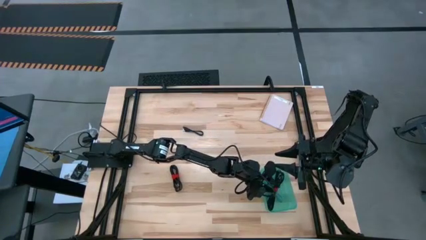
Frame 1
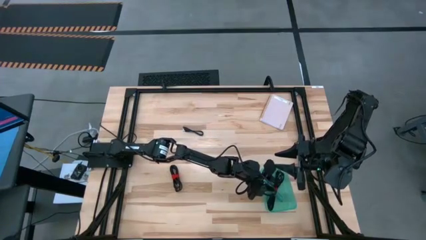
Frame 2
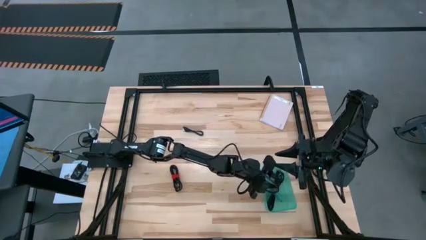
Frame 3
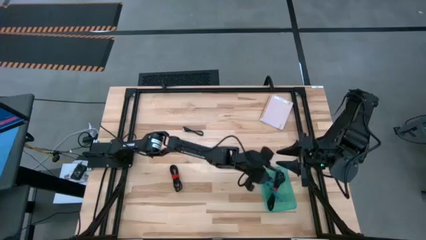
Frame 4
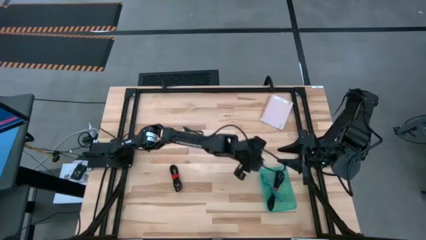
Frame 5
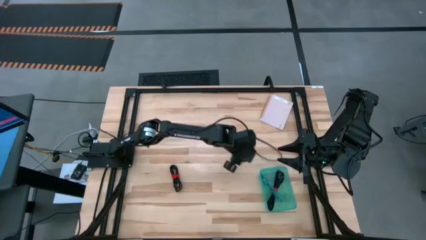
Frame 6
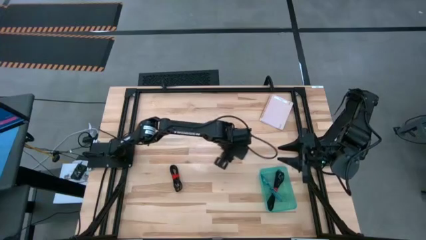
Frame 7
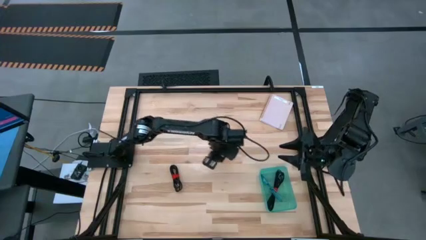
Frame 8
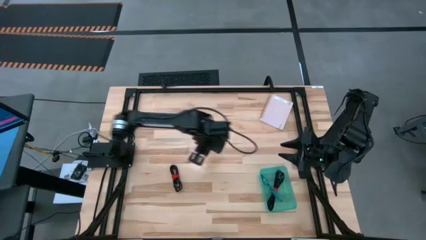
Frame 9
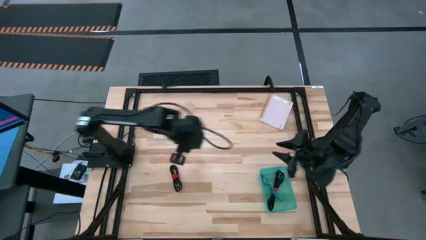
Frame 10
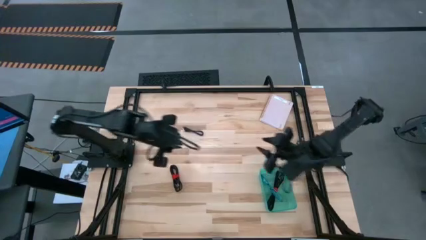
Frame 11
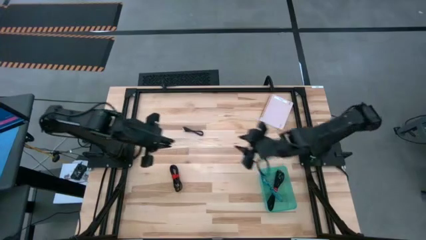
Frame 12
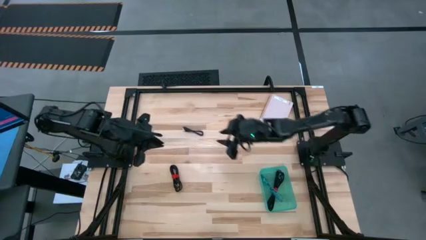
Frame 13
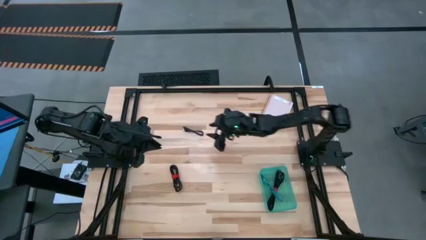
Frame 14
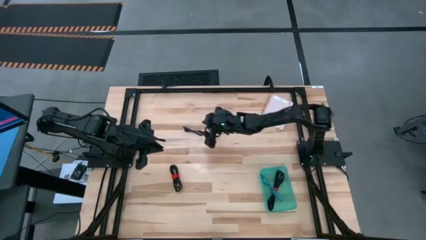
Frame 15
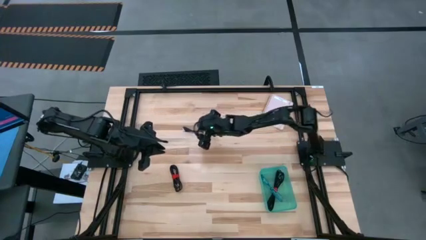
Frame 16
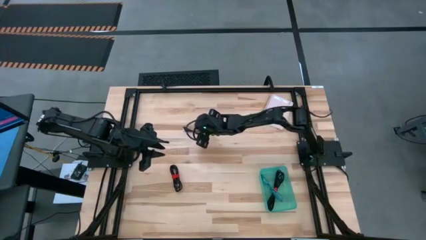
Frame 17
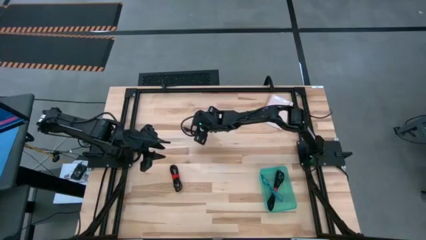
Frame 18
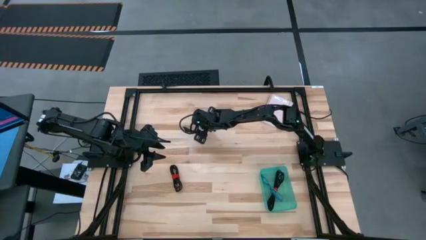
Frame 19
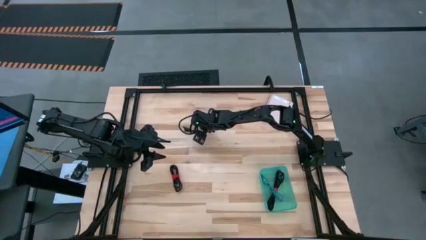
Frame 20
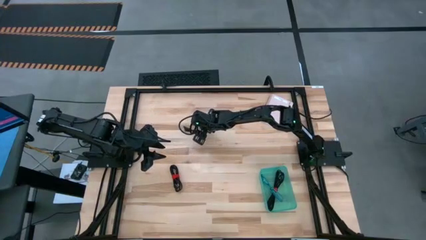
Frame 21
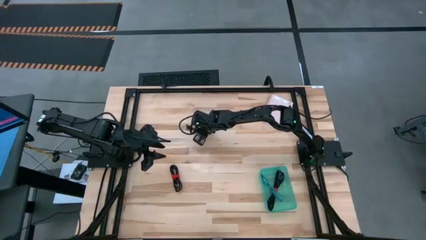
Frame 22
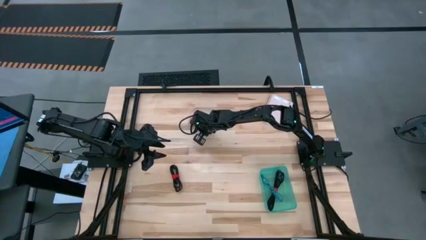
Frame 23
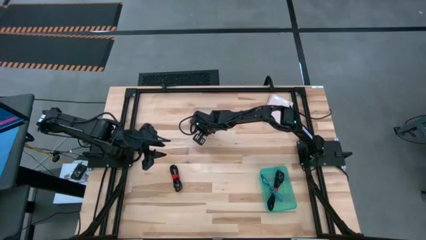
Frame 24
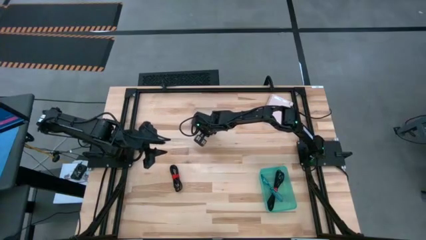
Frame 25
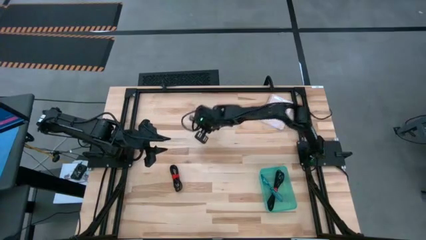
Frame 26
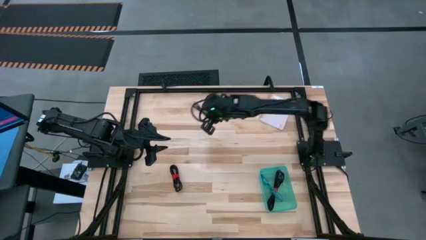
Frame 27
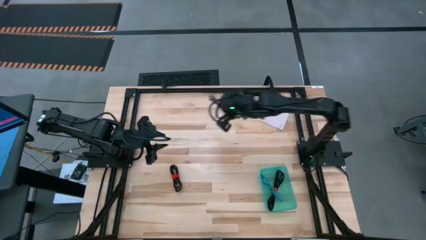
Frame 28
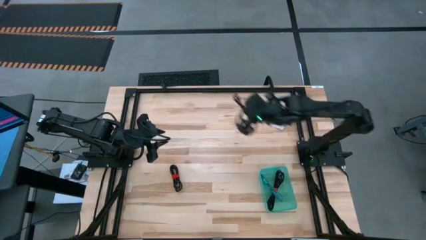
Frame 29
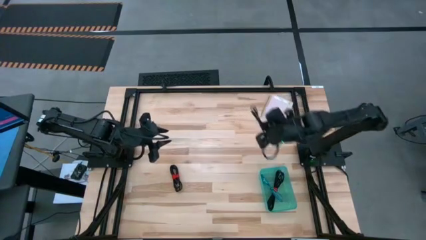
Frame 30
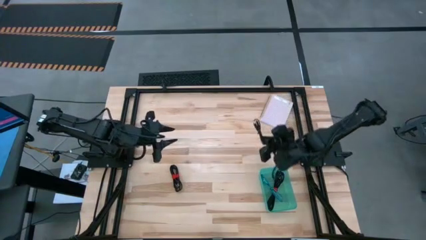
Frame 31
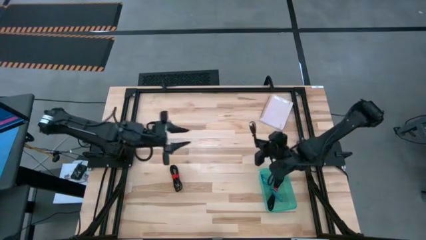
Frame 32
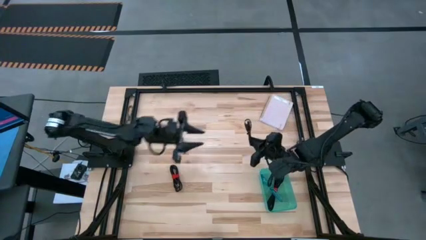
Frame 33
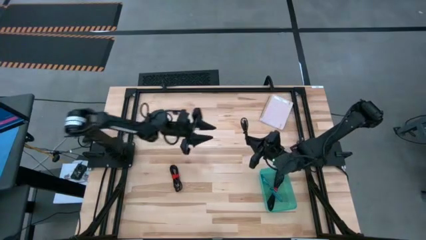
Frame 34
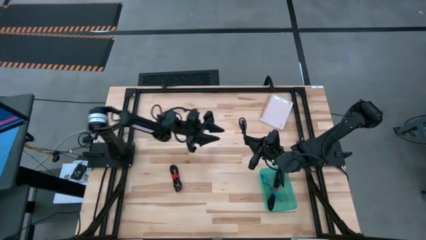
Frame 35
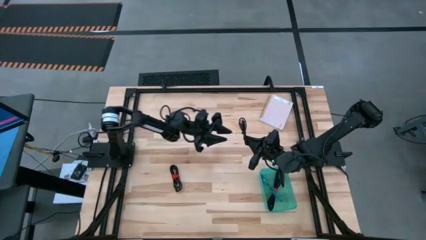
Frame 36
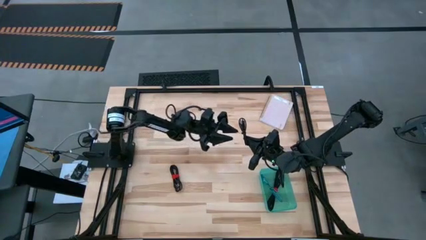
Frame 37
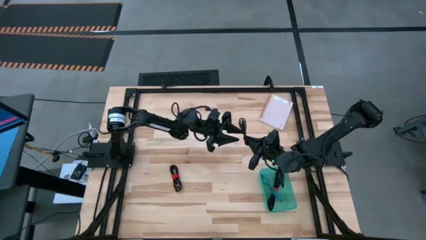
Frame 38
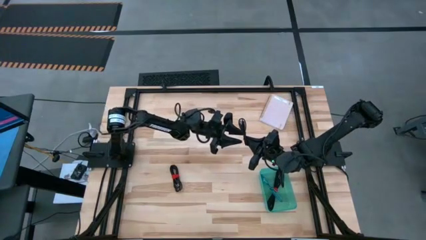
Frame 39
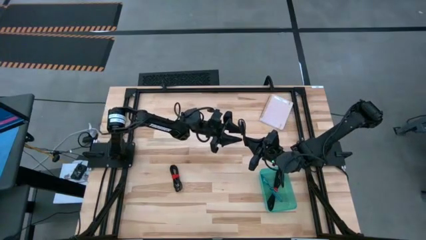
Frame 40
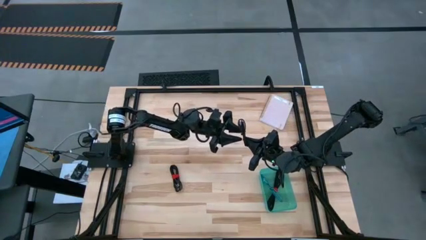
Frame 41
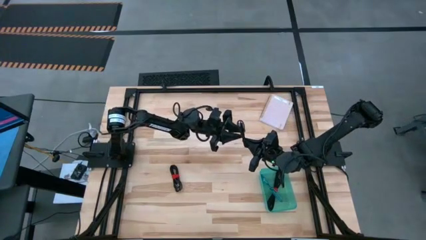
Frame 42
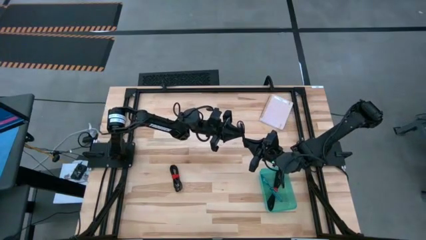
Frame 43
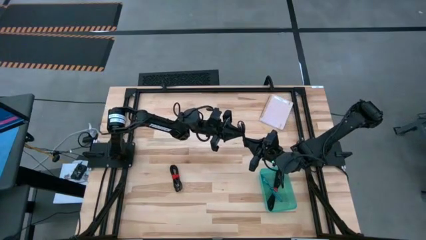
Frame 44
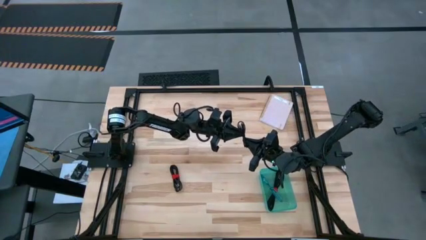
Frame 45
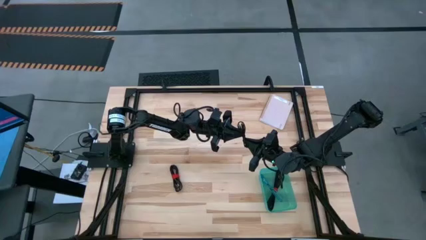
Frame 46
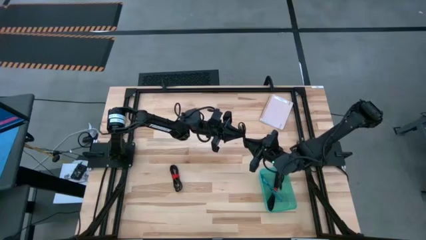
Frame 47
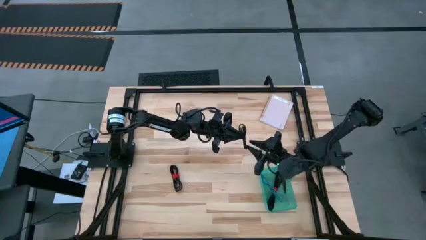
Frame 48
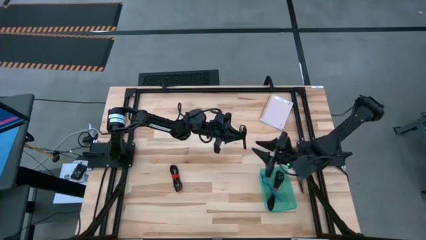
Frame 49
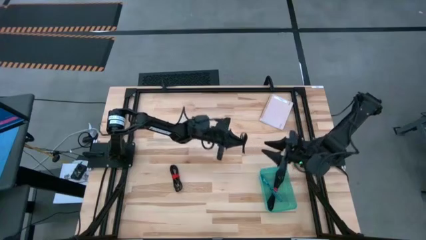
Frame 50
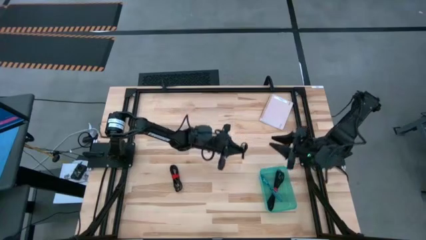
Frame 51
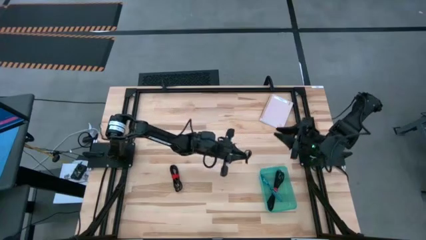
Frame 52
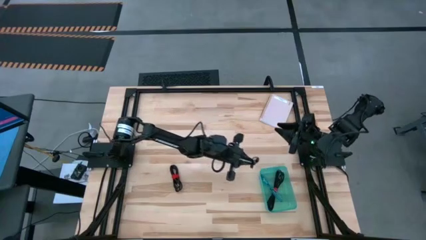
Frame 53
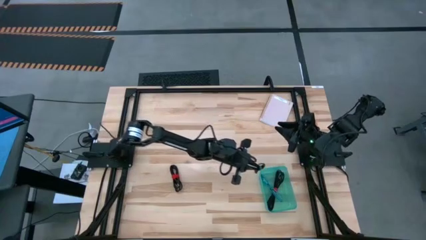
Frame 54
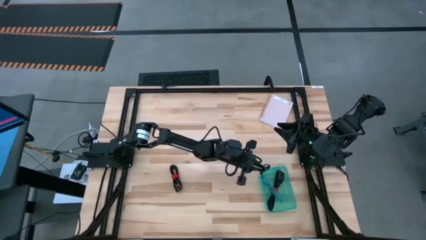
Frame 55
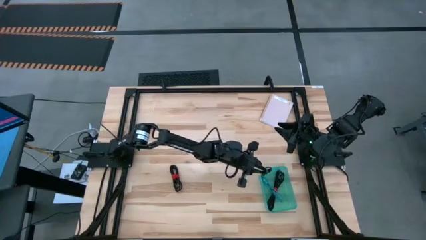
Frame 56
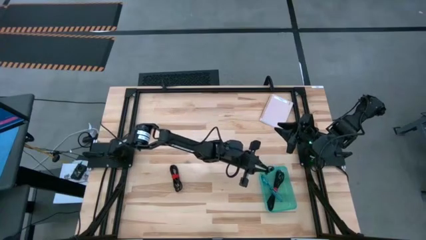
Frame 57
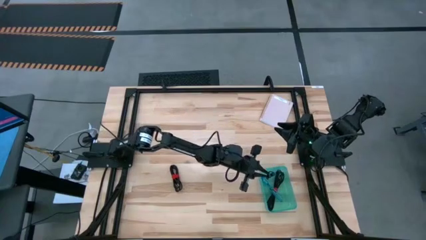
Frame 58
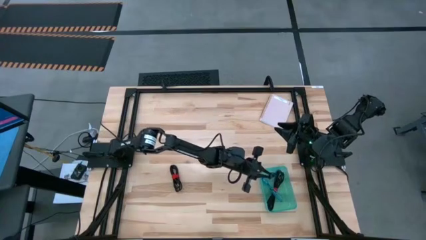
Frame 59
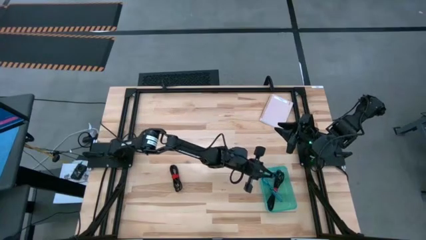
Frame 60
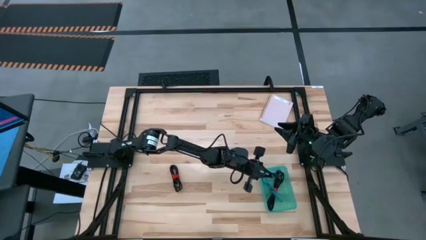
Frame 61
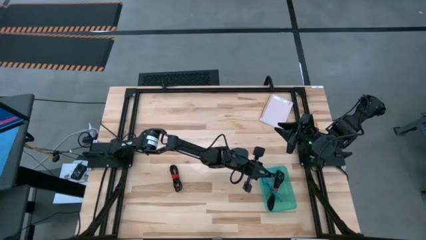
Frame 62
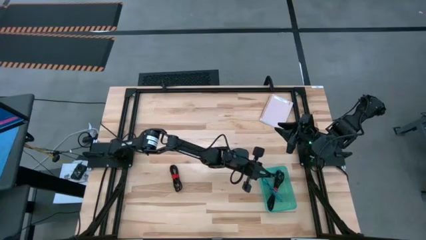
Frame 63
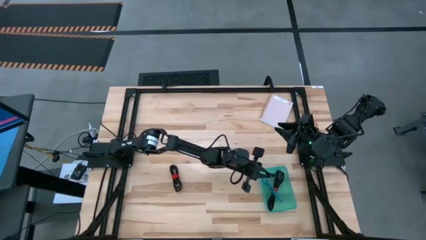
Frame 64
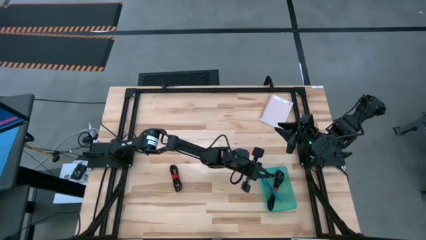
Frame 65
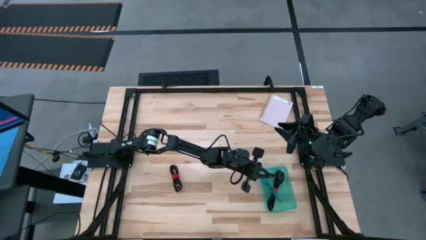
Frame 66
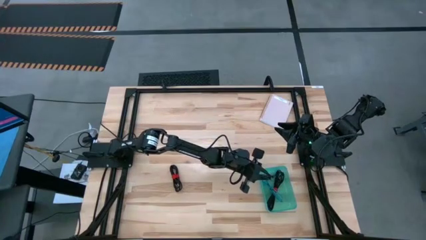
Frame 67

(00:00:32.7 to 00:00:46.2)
Task: Pick and place USB-C Cables
Put the top black charger cable into the green bin

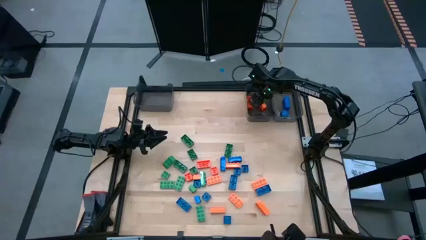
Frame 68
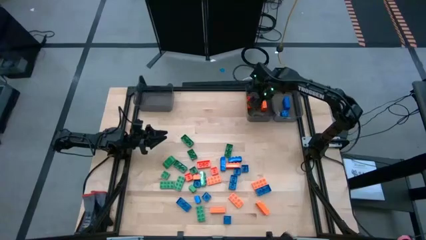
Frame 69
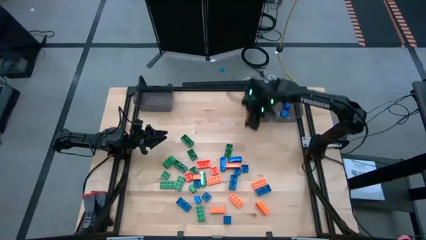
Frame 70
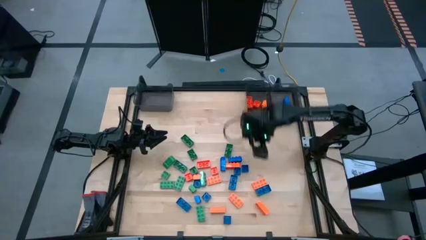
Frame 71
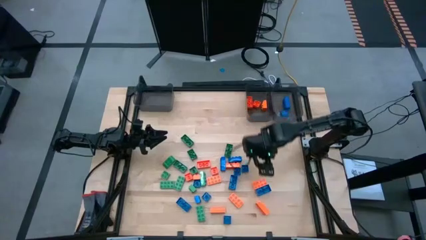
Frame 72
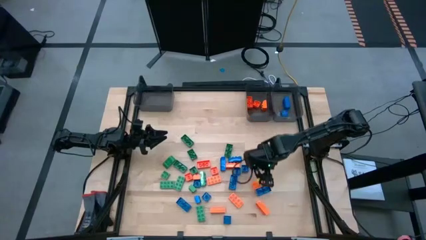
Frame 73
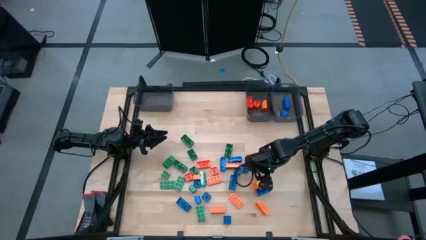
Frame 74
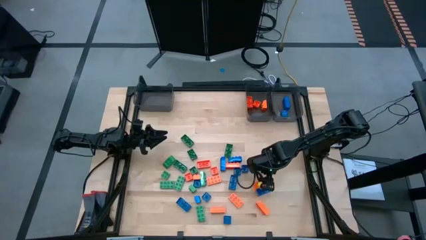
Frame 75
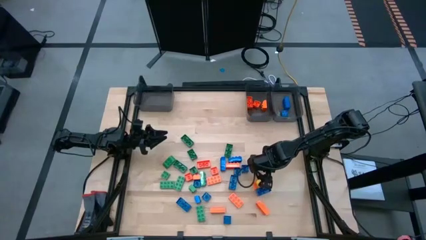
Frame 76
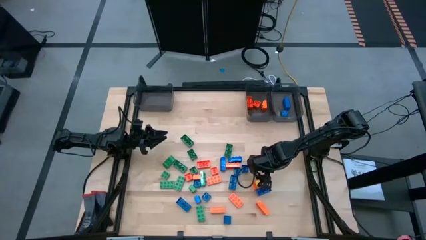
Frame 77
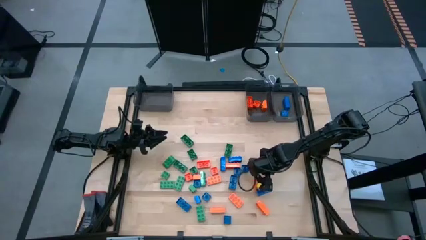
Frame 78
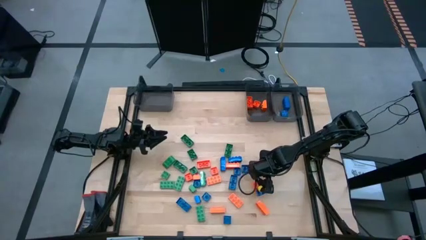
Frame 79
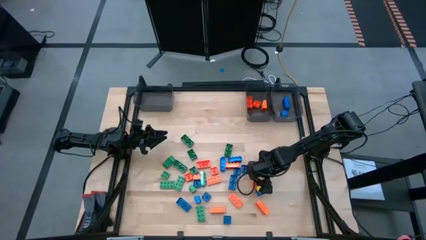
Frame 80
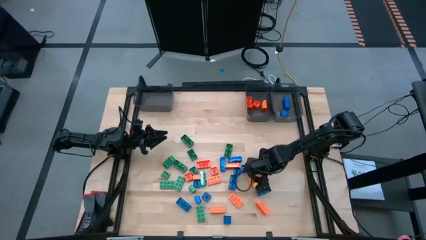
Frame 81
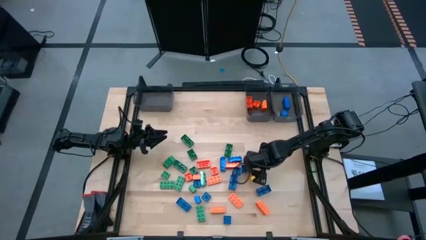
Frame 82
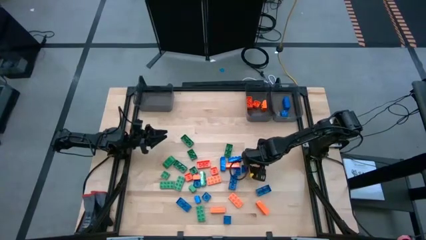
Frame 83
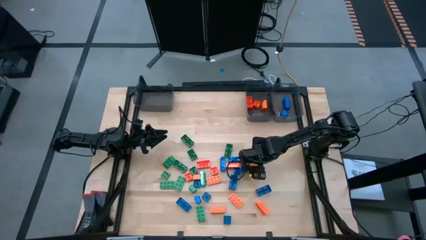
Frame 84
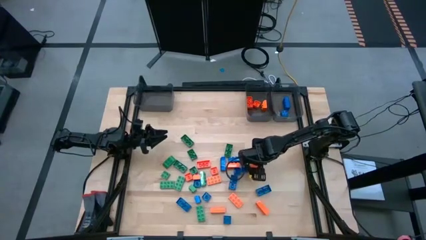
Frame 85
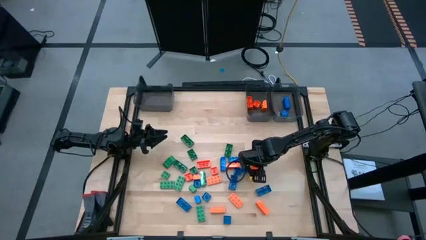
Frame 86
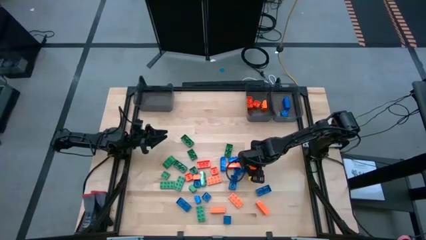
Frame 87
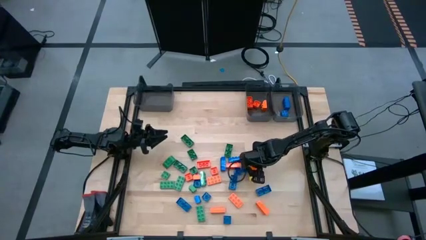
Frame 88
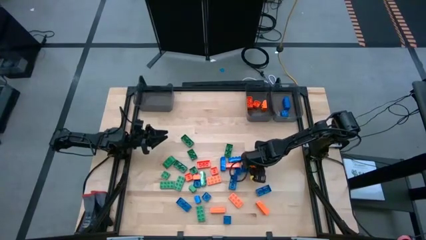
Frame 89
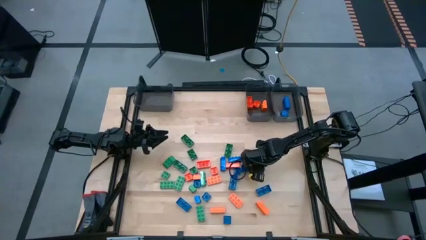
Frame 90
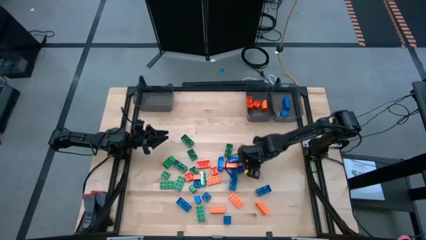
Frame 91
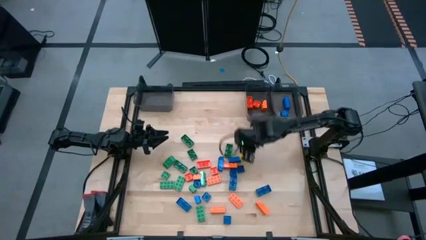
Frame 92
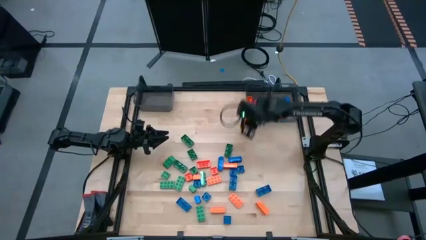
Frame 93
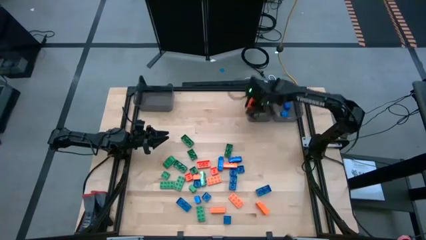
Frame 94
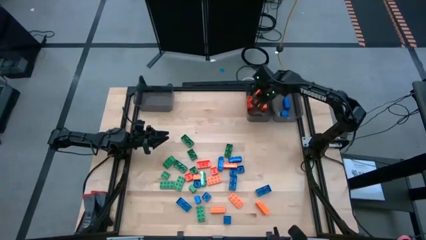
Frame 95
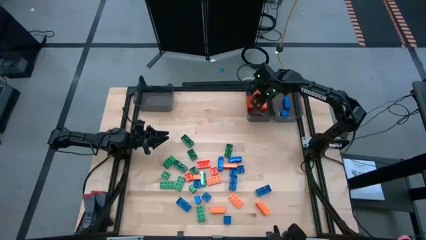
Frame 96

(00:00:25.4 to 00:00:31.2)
Task: Sort blocks
Put the orange game piece into the middle black bin
